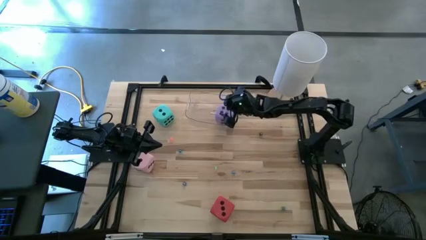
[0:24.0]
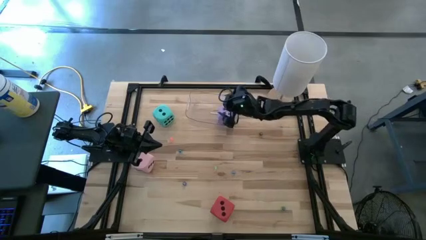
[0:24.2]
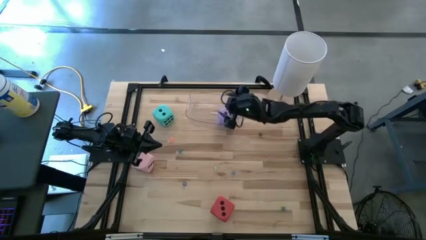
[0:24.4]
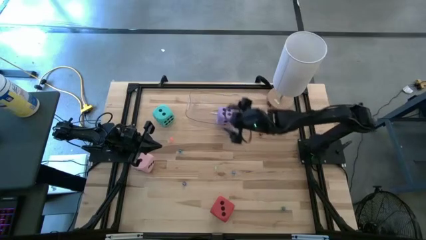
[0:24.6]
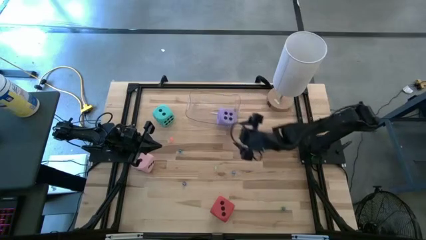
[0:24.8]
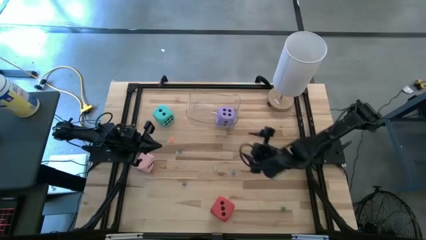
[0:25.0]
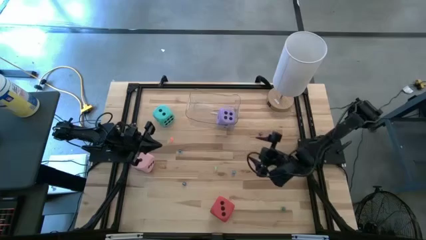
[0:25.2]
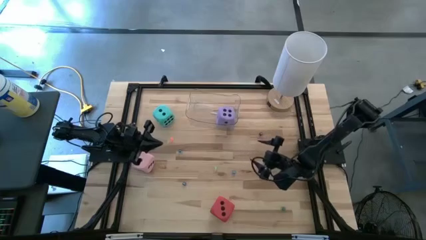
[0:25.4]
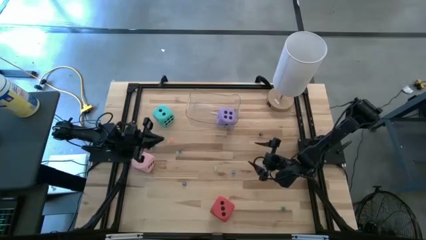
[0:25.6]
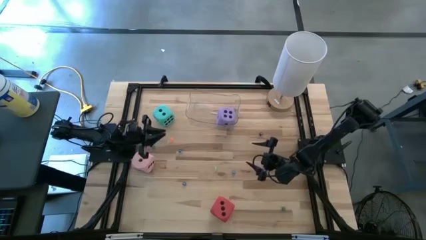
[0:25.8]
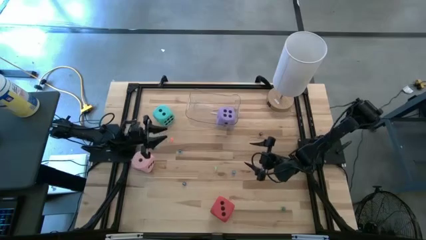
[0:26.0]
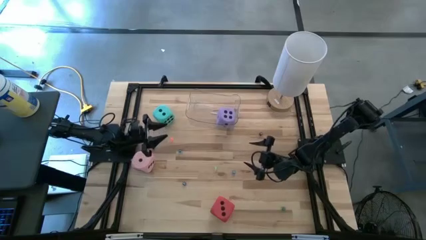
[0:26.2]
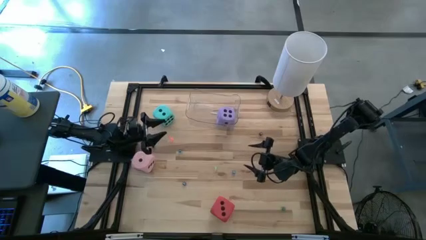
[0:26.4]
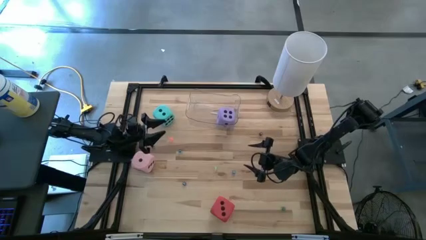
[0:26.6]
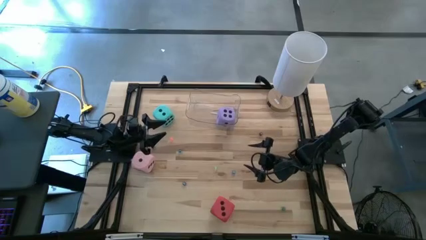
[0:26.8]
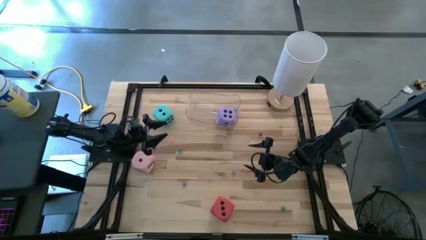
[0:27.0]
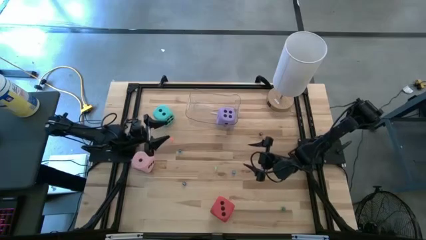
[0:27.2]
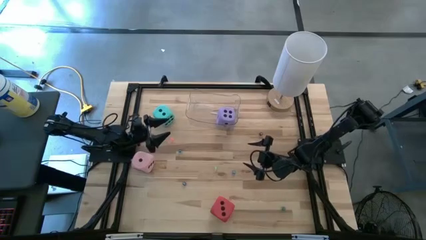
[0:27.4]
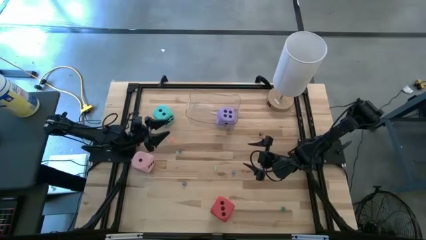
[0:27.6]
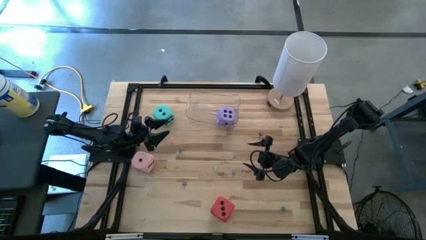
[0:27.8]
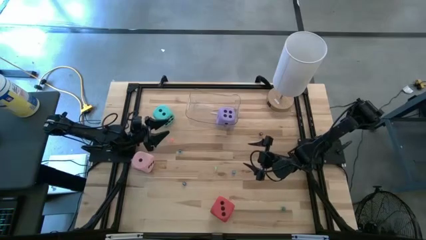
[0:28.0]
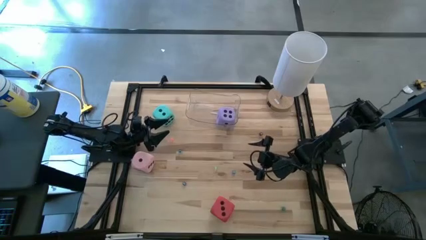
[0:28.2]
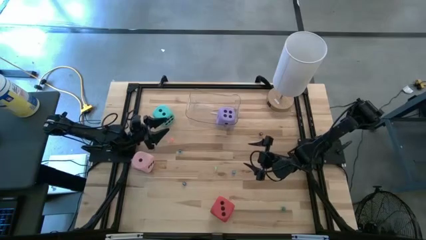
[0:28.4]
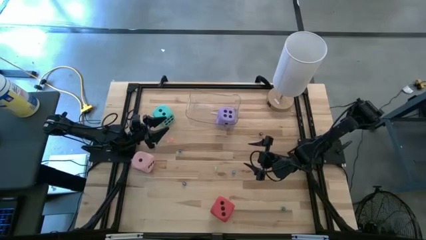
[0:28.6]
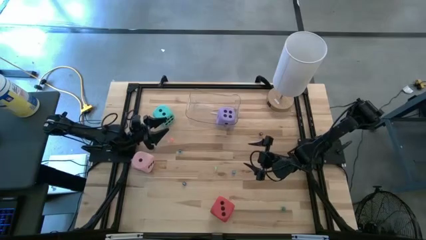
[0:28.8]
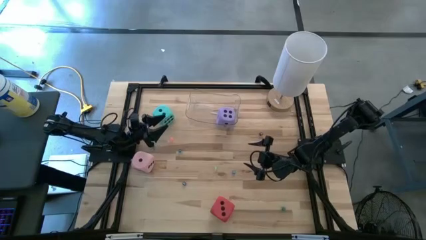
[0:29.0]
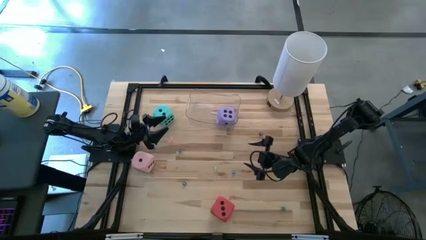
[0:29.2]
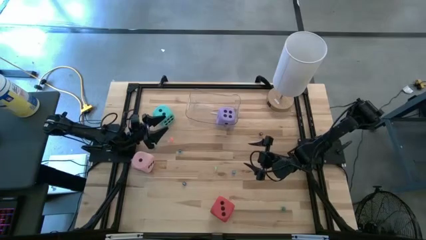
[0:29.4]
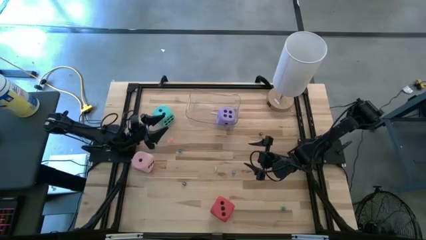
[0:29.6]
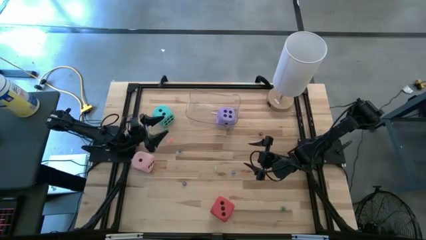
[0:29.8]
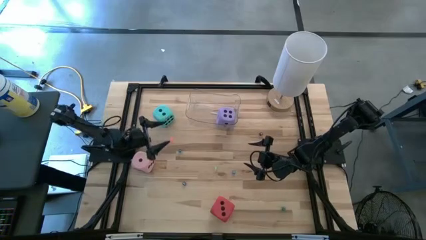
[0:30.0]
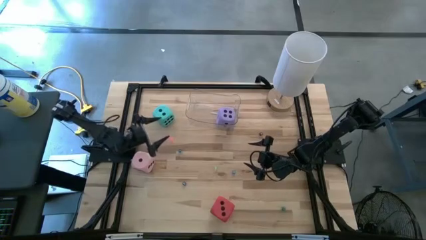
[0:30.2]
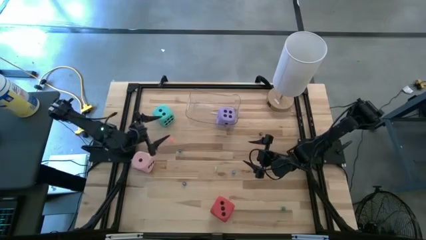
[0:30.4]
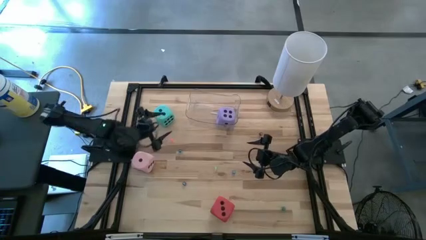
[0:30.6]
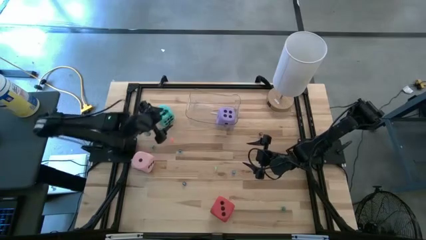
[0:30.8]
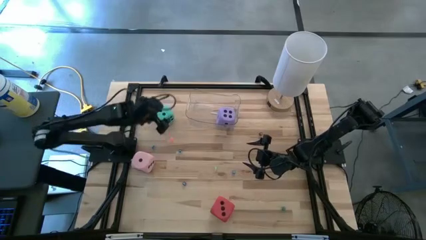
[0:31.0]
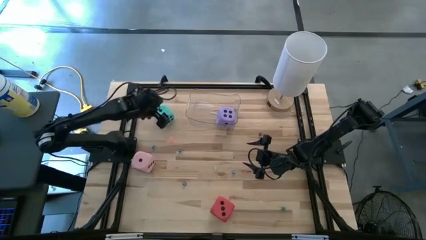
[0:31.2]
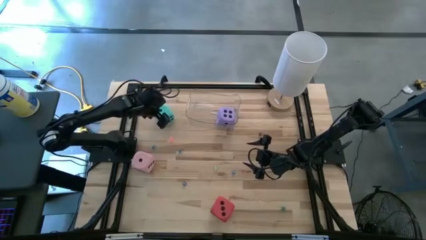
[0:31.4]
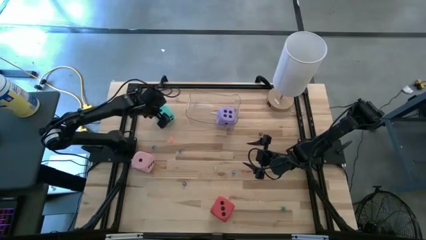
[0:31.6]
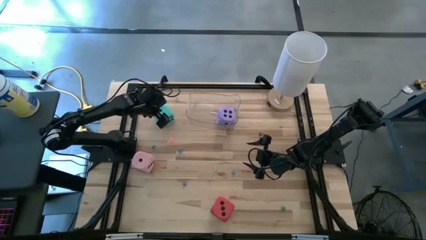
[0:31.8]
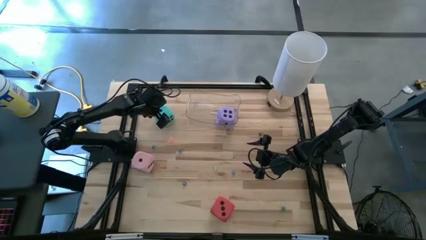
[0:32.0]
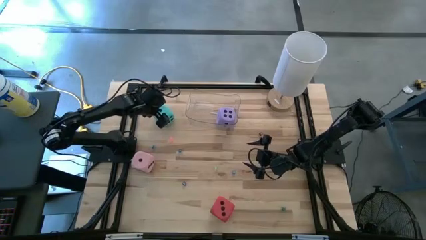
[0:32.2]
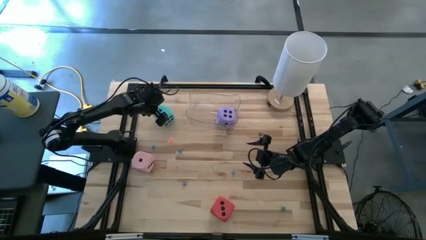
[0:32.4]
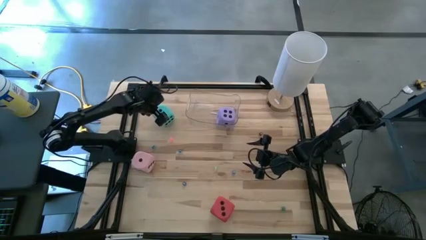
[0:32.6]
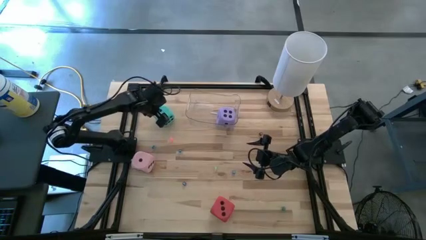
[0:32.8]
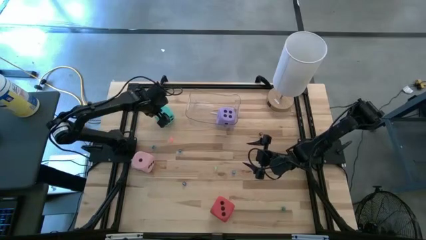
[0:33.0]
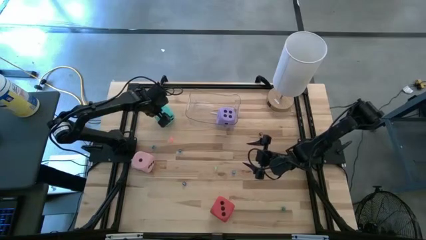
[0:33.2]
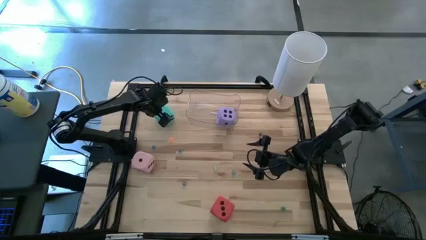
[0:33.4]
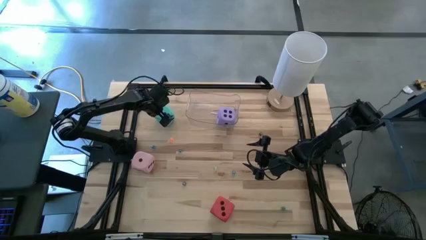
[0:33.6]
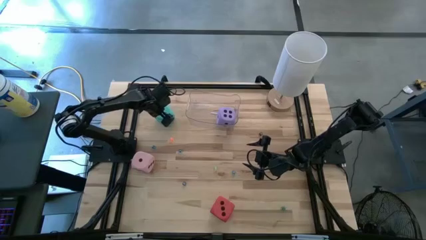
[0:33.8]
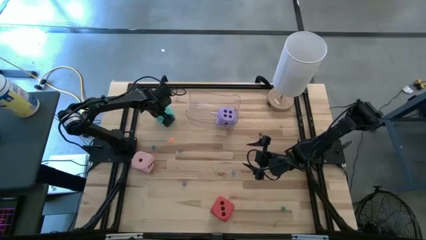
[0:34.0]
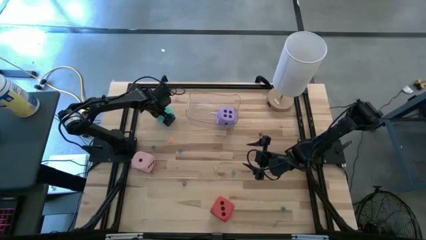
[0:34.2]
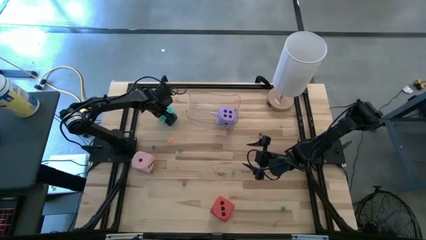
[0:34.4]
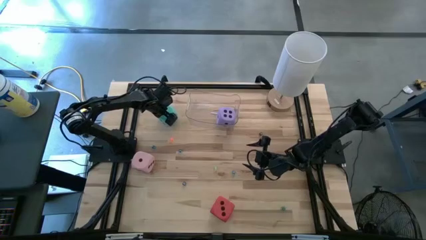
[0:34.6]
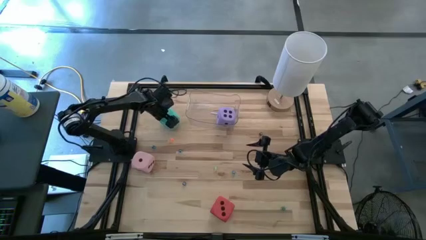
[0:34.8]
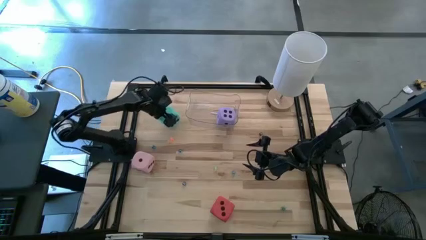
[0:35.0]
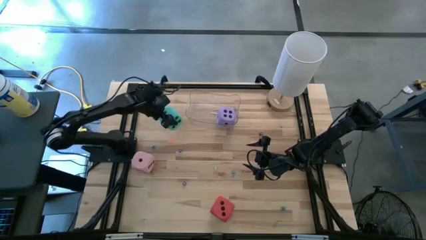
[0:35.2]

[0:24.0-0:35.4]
Task: Pick & Place Dice
Put the large blue dice into the transparent bin
